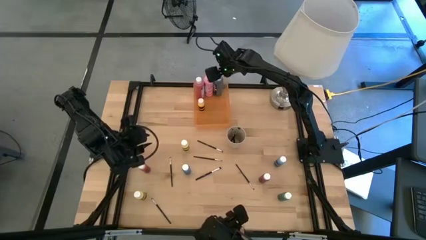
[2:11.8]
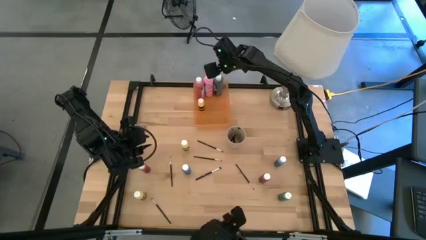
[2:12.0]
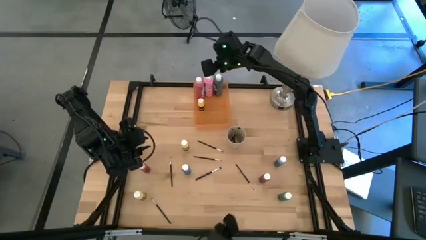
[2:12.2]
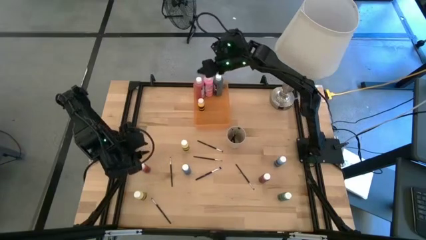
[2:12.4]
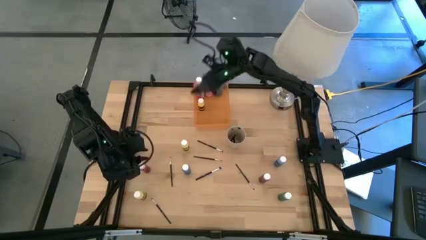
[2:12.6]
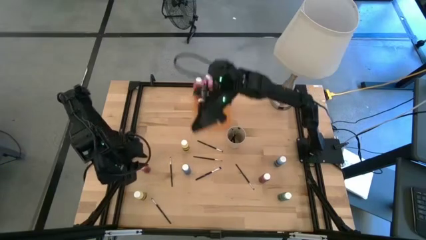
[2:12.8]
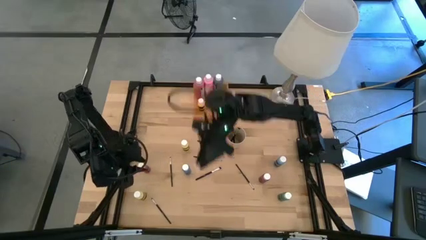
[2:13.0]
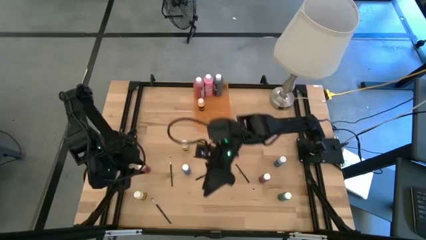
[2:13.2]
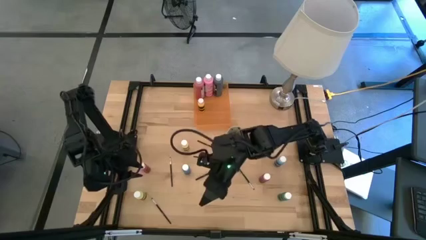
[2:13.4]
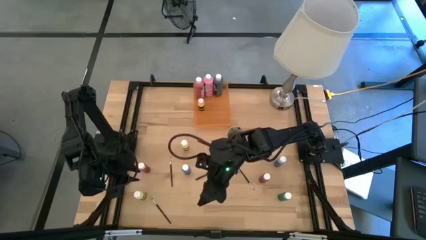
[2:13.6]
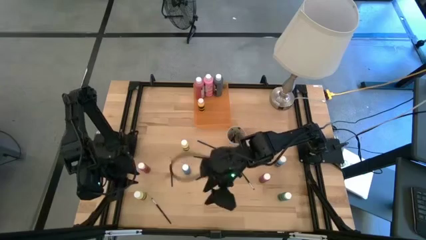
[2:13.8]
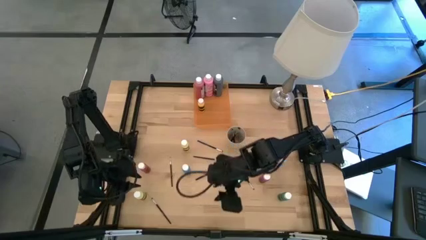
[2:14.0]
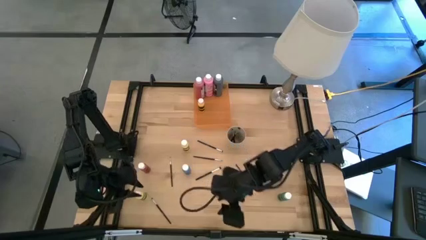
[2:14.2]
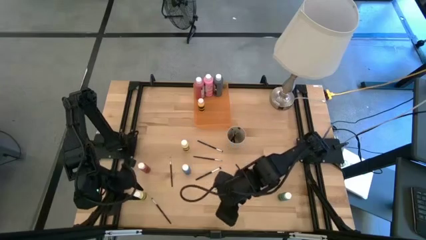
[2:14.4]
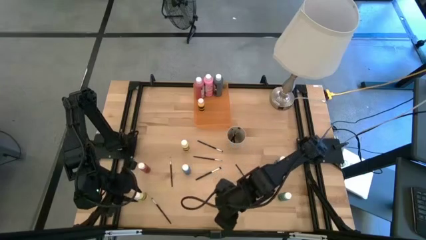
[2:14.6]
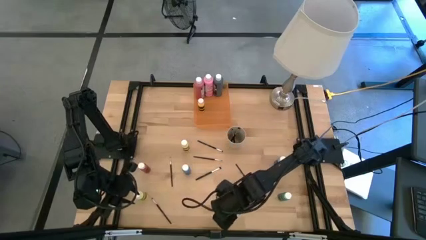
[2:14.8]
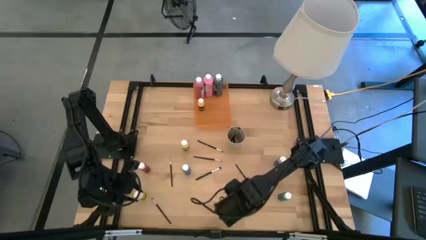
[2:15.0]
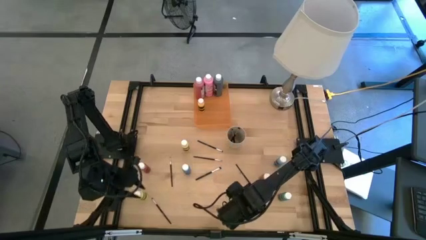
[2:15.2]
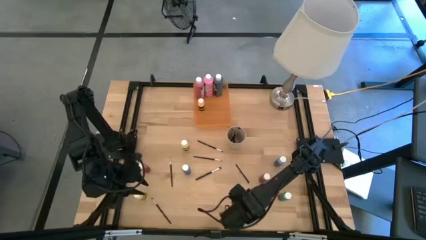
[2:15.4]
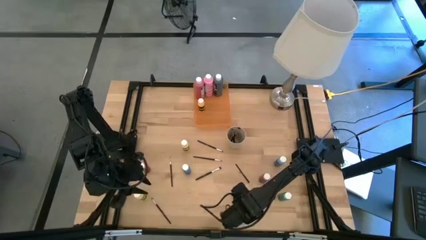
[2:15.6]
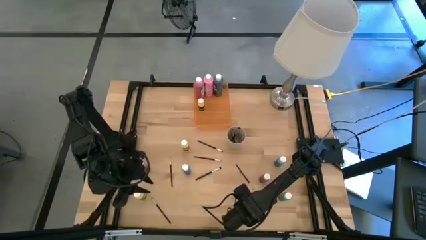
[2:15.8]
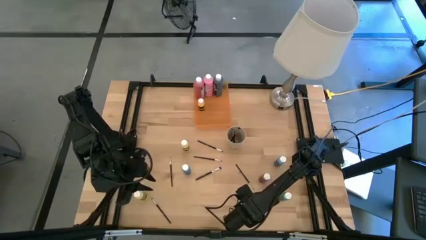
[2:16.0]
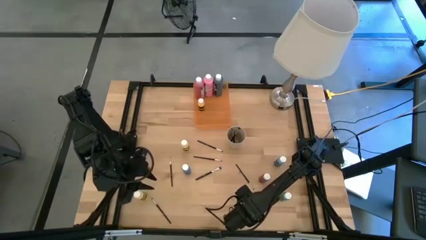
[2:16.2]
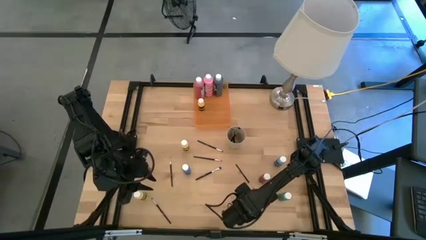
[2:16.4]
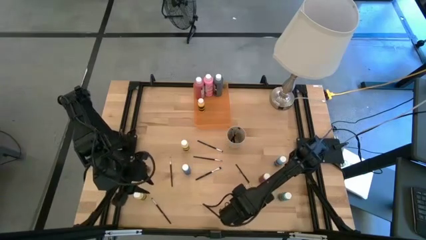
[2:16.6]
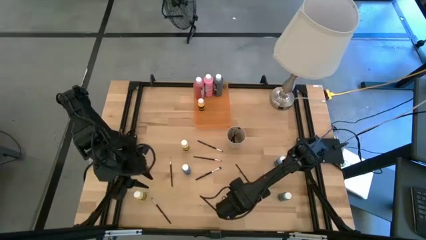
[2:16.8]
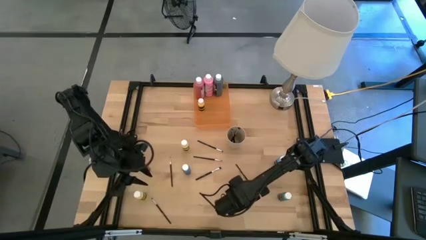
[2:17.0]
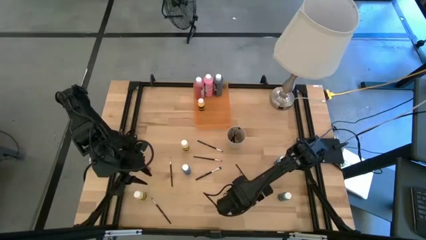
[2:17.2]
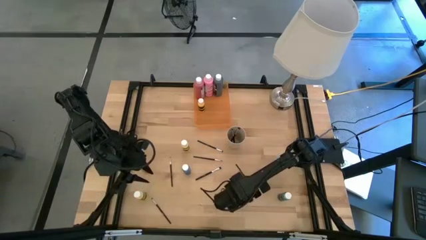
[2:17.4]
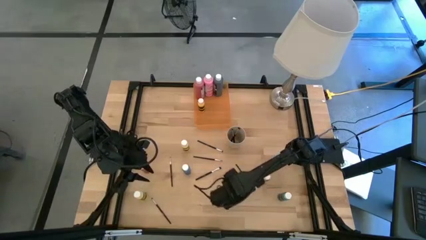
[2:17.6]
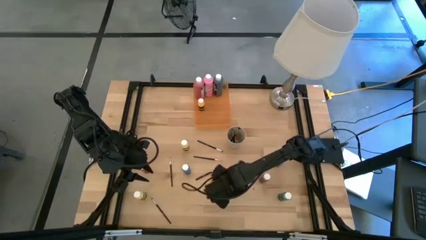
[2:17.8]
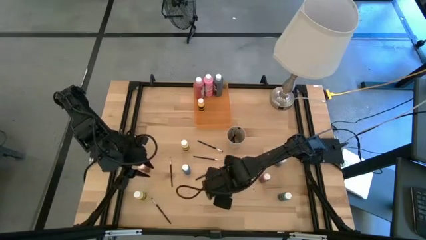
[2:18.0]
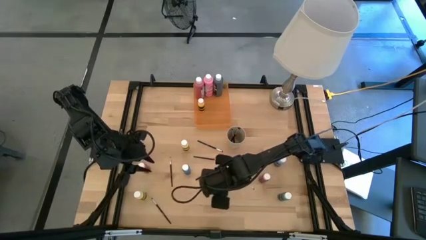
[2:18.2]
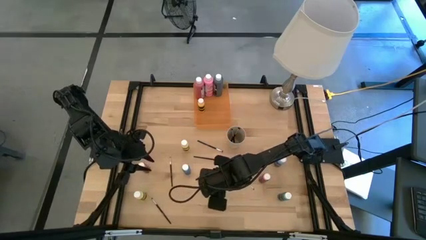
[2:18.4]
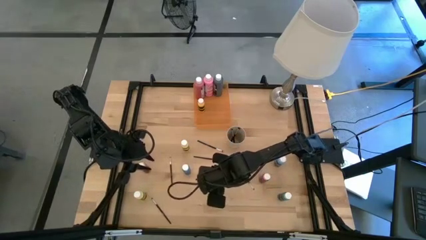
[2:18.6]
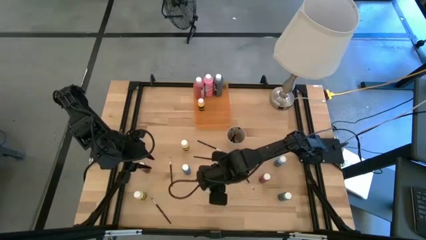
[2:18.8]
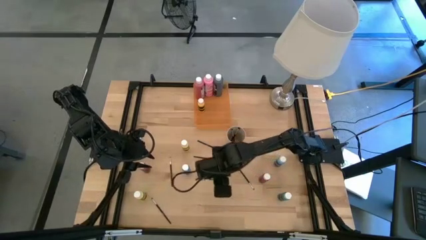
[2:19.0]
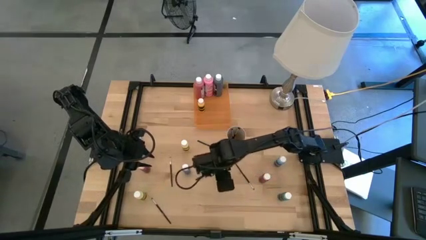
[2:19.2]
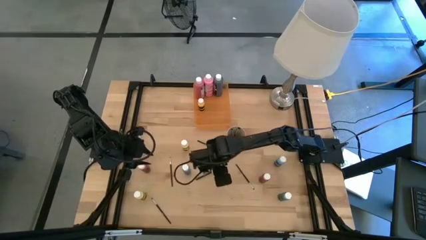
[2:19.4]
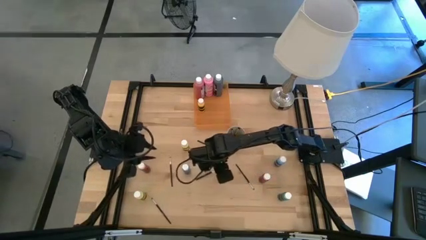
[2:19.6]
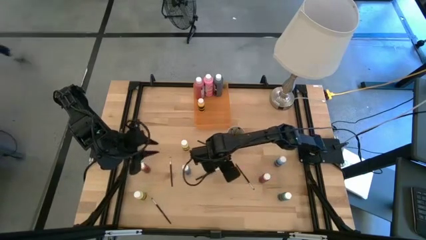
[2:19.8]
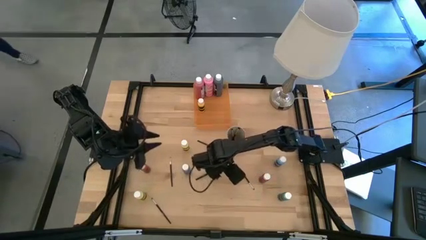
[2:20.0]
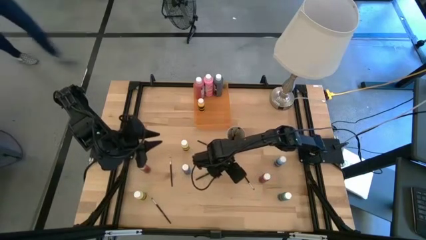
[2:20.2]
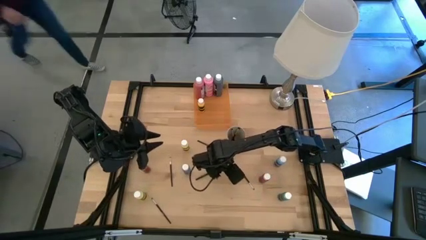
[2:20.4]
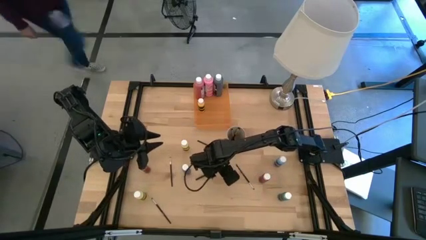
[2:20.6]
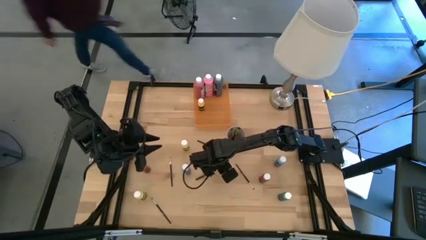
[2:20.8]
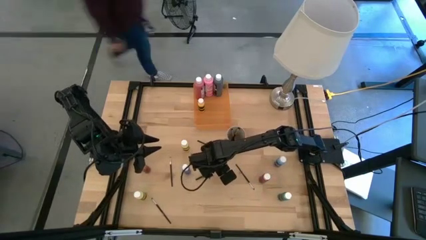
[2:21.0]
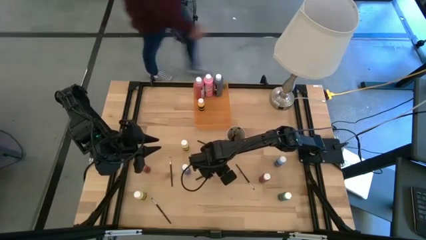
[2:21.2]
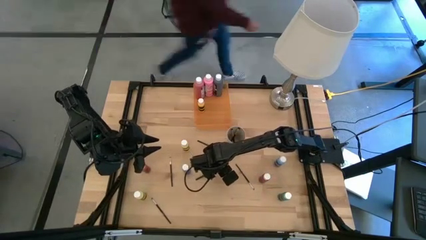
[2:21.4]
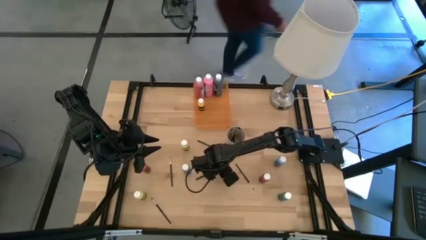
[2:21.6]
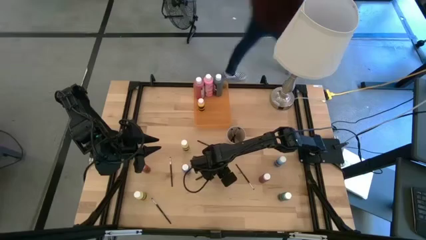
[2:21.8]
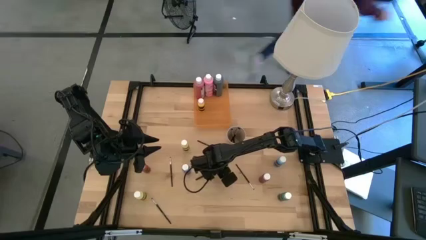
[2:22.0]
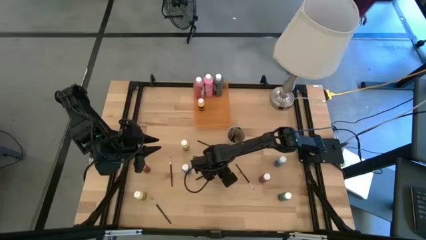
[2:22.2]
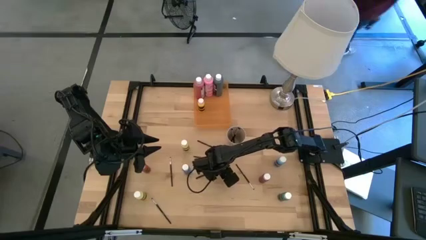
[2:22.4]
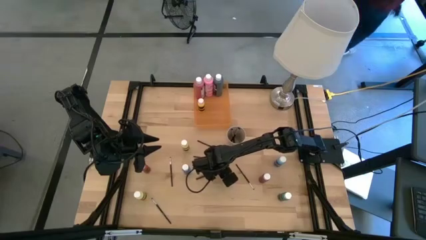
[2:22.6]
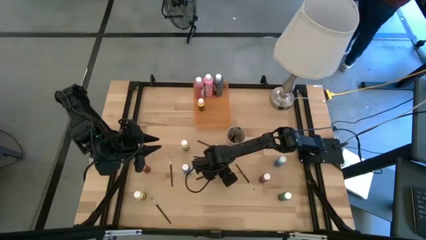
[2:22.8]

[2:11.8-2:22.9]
Task: Pick & Place Paint Supplies
Put the black paint brush into the light brown cup

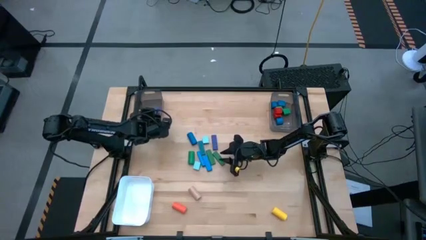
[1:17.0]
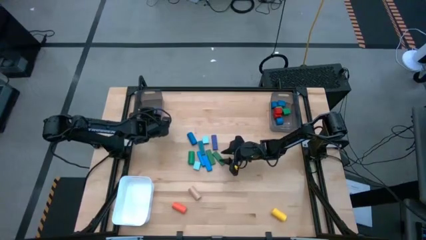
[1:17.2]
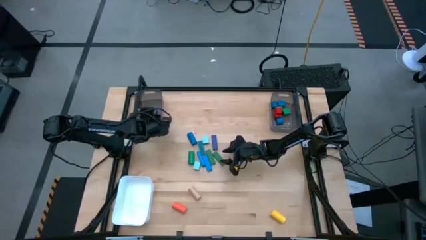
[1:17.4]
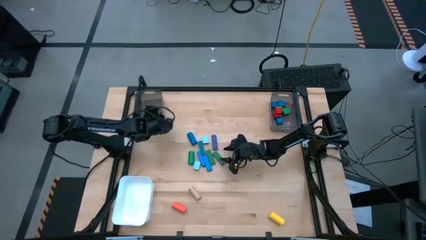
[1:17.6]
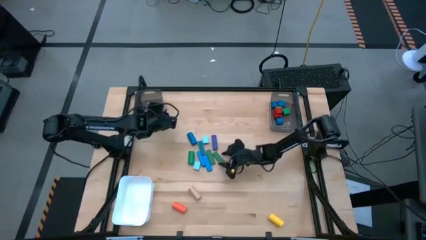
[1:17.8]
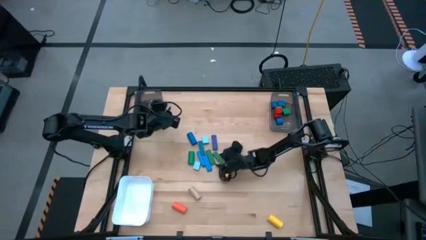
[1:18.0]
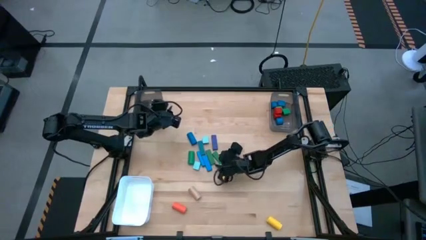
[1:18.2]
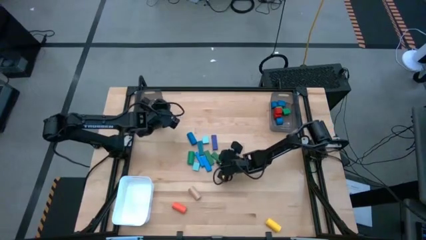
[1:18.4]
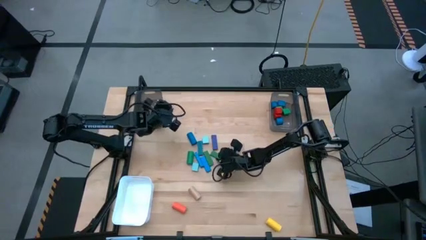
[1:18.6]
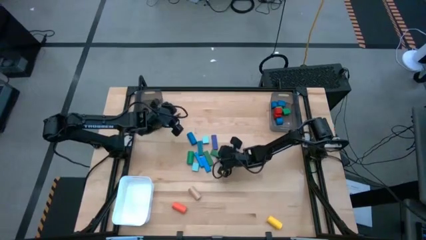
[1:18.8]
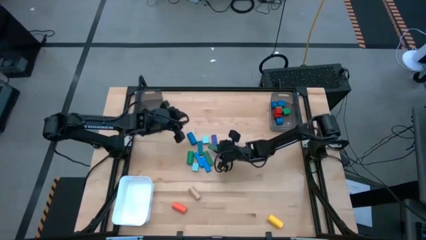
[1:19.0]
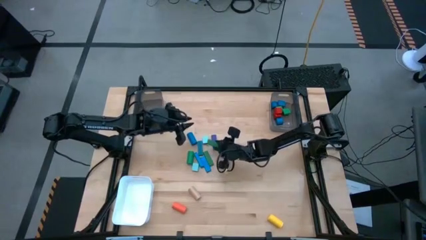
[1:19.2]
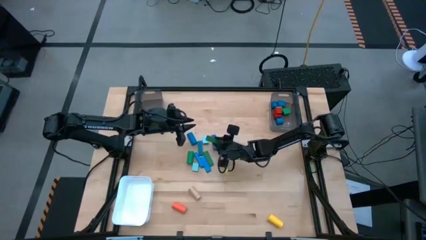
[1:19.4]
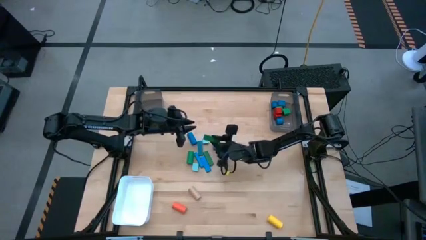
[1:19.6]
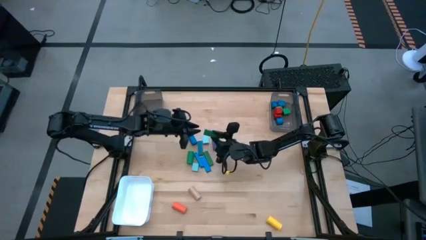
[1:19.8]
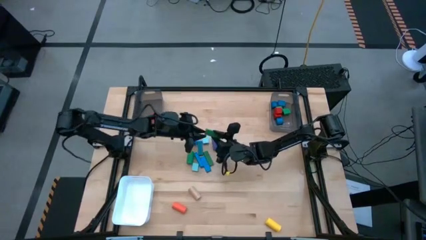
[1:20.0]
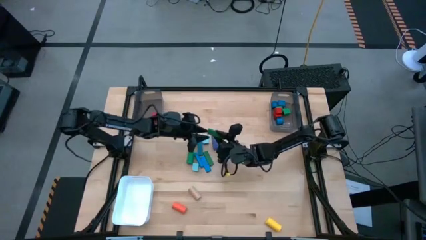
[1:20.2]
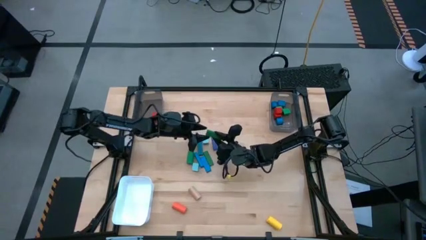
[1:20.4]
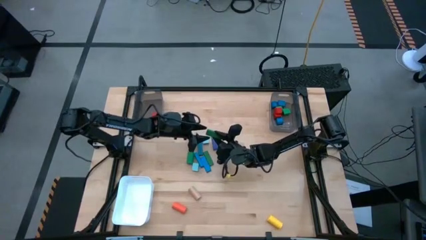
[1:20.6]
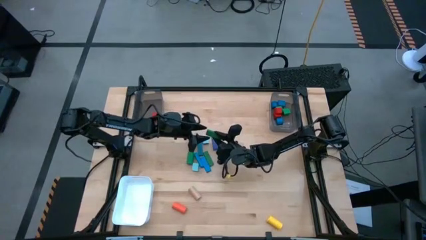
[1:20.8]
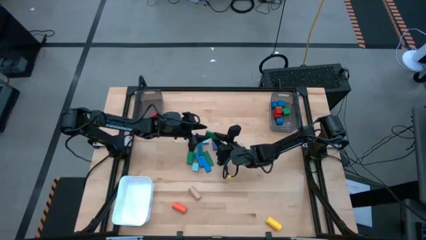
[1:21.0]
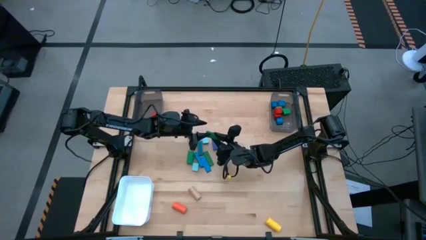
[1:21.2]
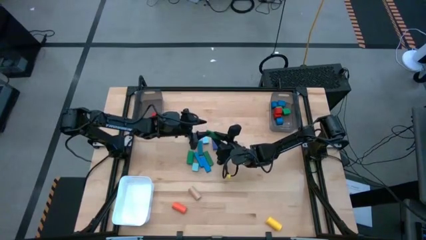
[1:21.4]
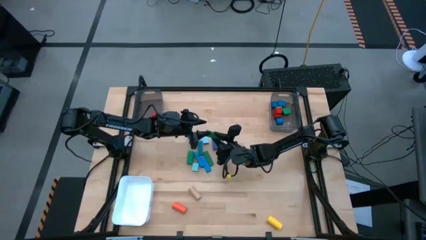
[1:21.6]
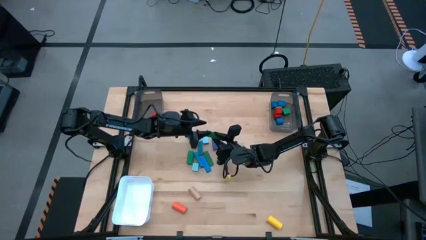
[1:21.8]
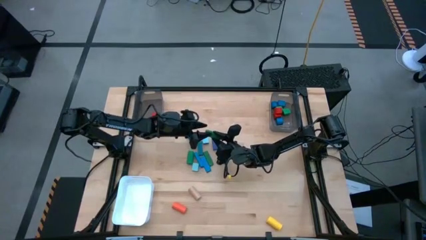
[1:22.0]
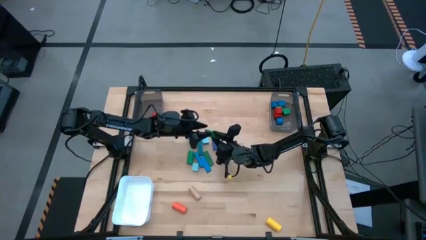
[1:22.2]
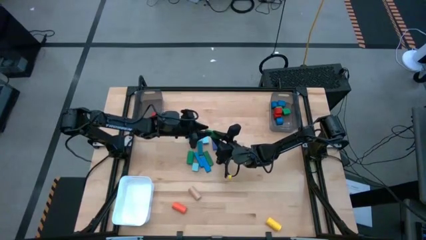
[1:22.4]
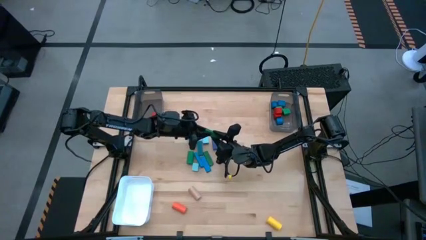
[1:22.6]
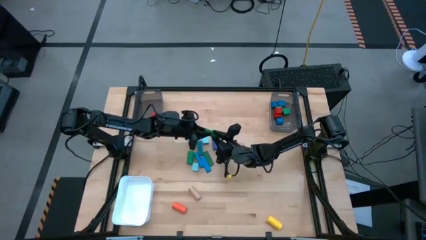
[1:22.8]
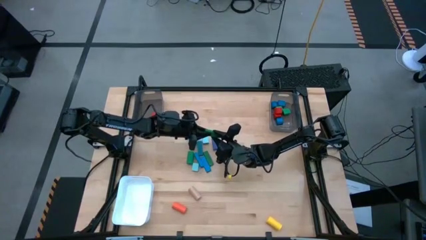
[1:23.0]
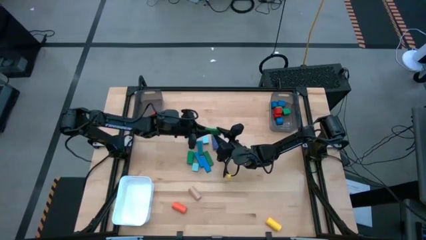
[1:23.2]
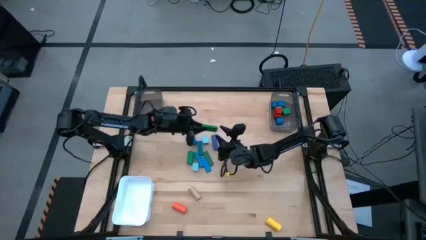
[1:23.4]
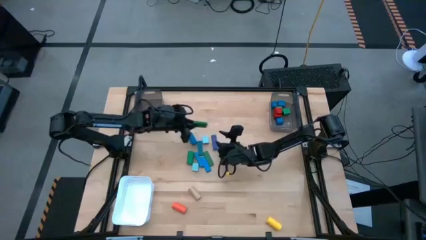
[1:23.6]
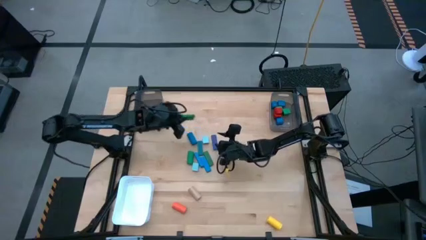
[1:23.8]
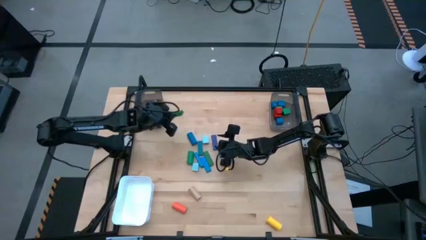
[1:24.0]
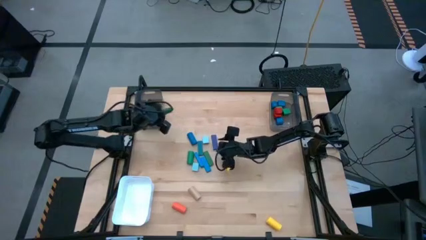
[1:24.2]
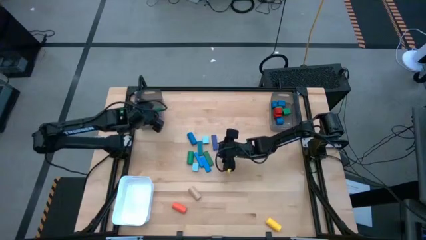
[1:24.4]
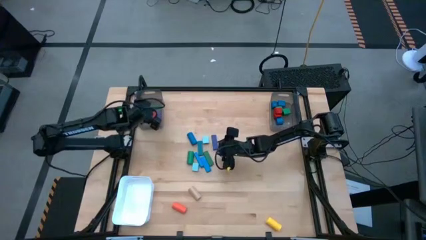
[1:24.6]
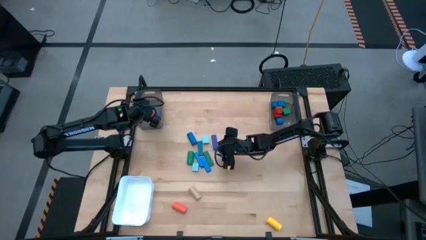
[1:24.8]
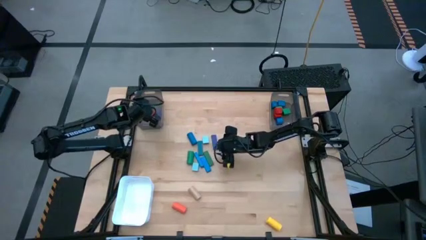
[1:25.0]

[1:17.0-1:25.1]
Task: Sort blocks by size
Put the green rectangular block into the left black bin
